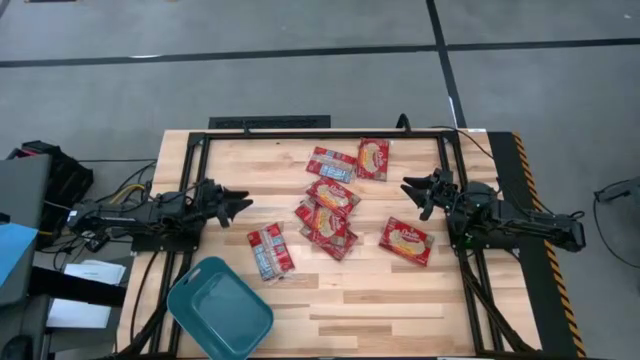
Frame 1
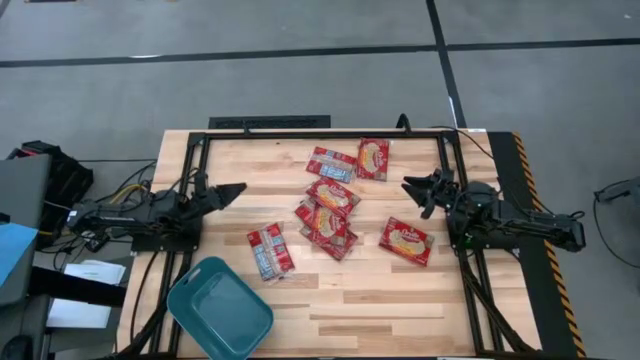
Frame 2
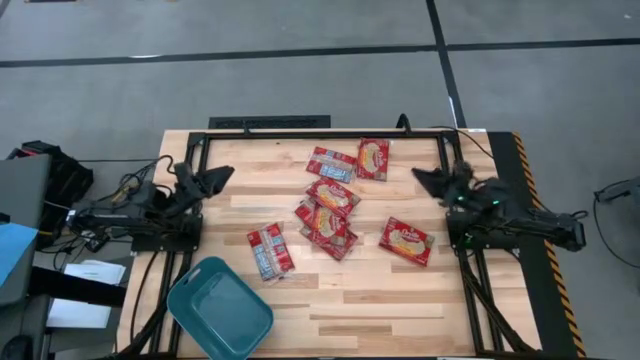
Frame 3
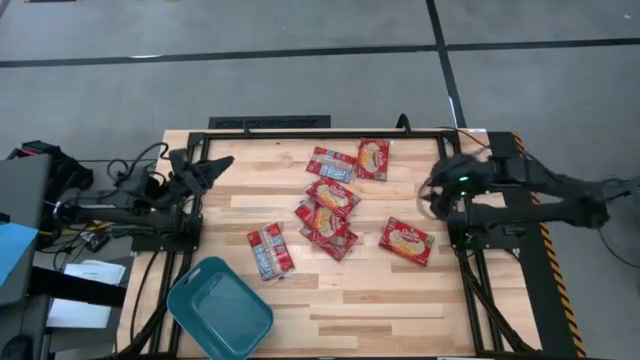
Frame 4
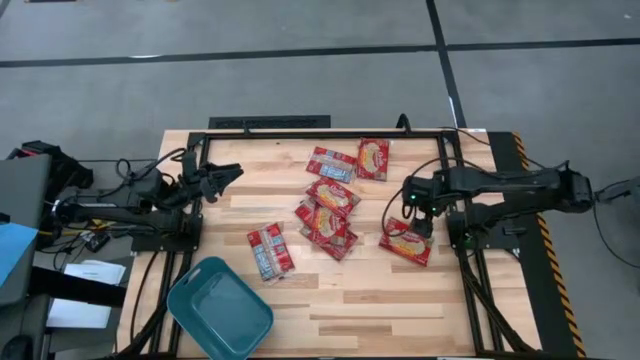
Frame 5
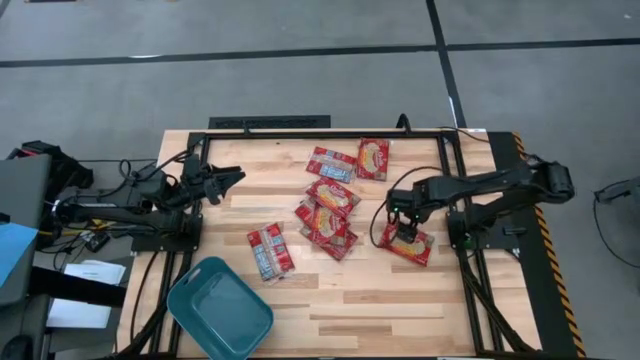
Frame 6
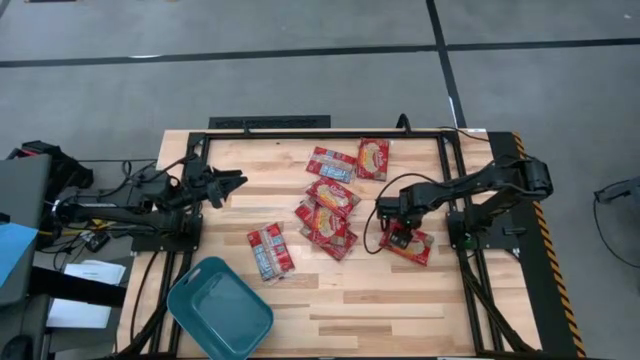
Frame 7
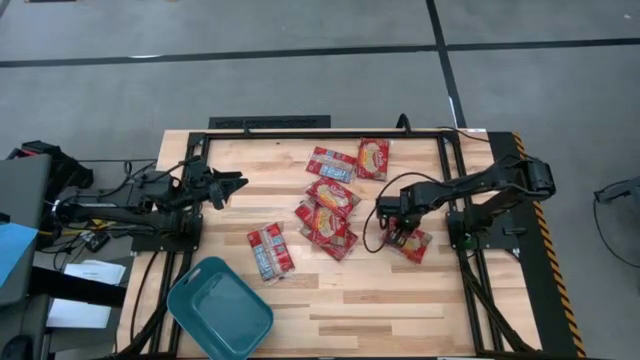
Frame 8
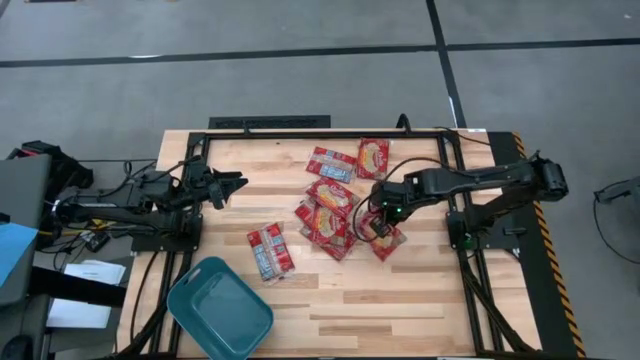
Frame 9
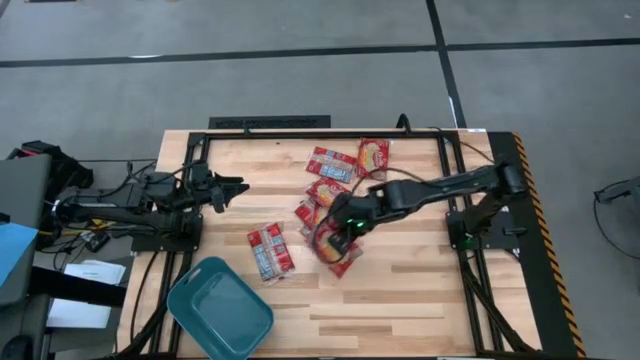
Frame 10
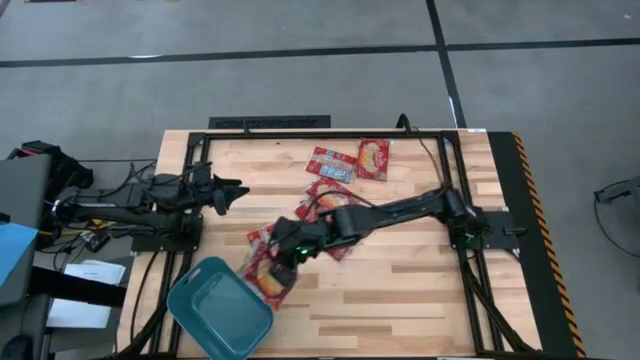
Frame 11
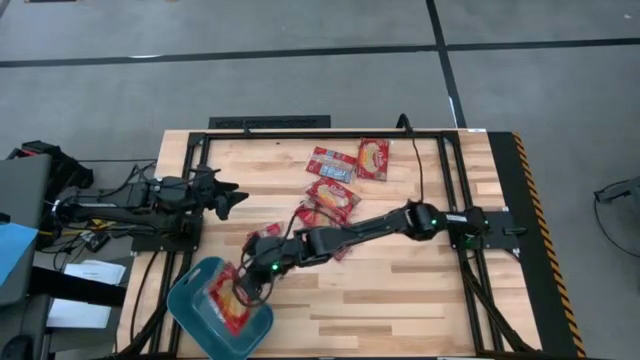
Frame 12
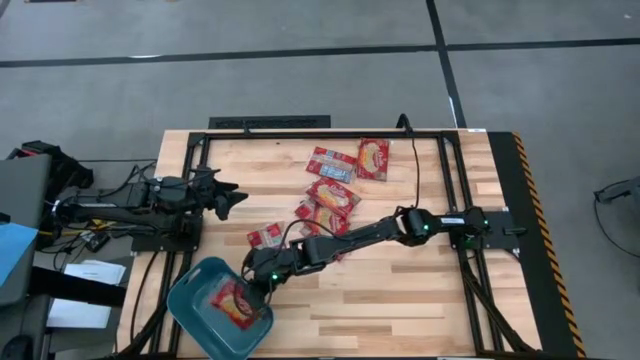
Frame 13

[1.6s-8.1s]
Task: Sort popcorn bags into baskets
Put the red popcorn pack into the blue bin

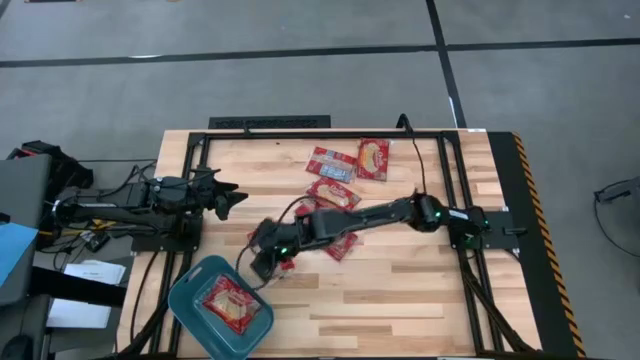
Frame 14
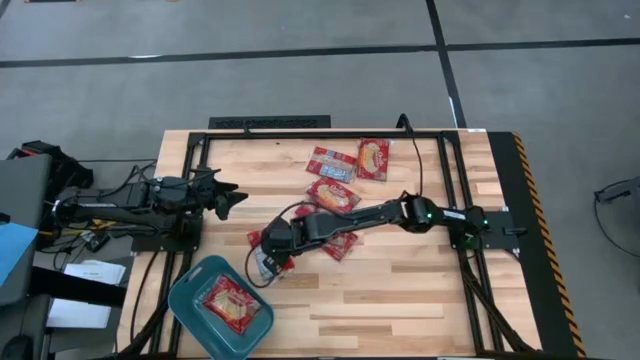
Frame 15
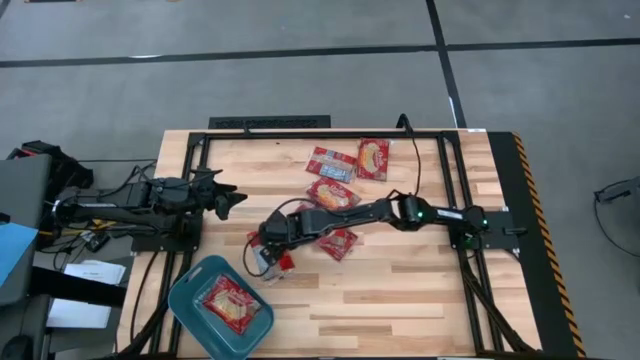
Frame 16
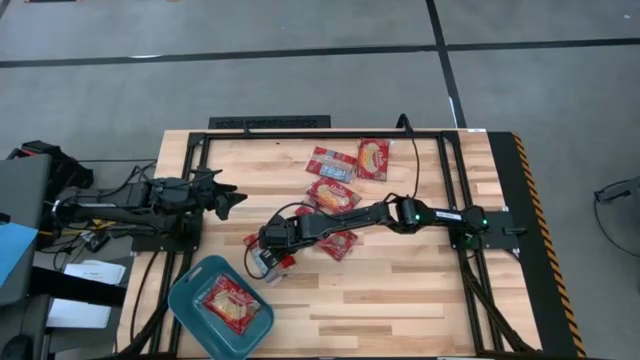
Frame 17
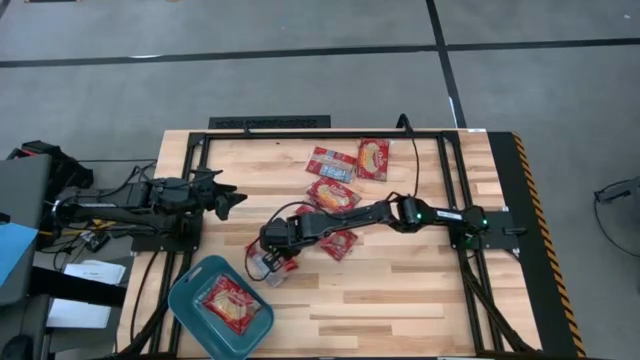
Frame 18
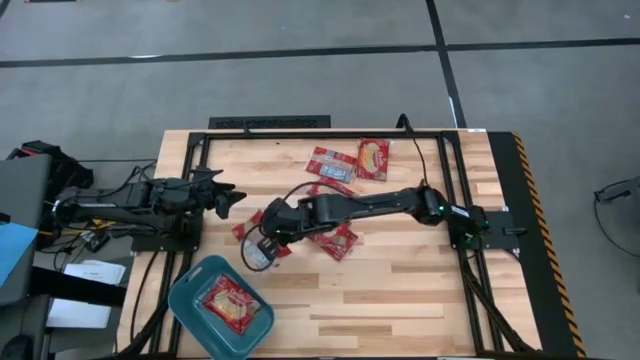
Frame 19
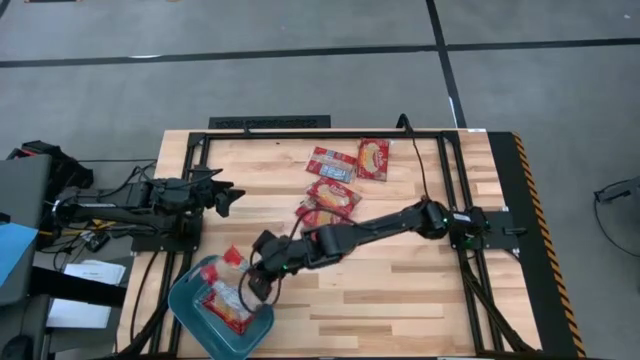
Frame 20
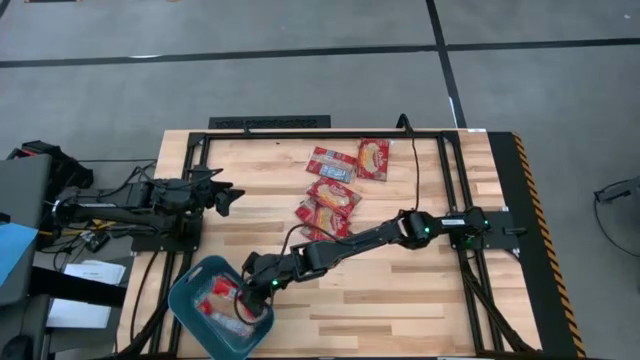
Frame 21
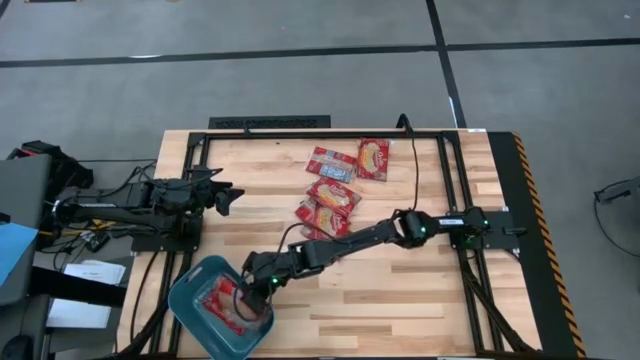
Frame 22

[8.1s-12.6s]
Put the red popcorn pack into the blue bin

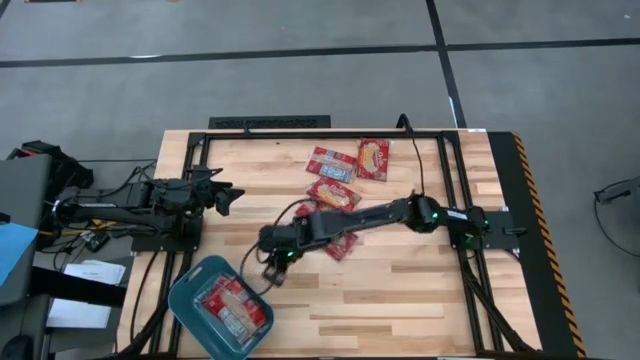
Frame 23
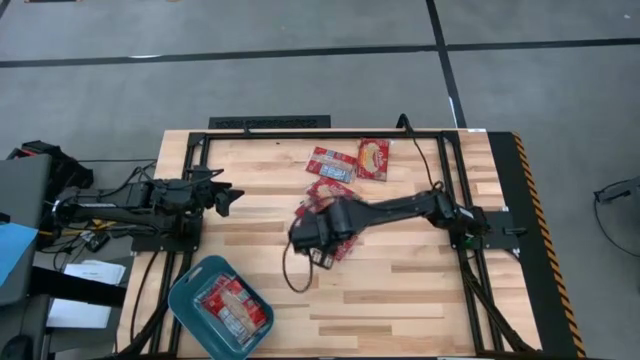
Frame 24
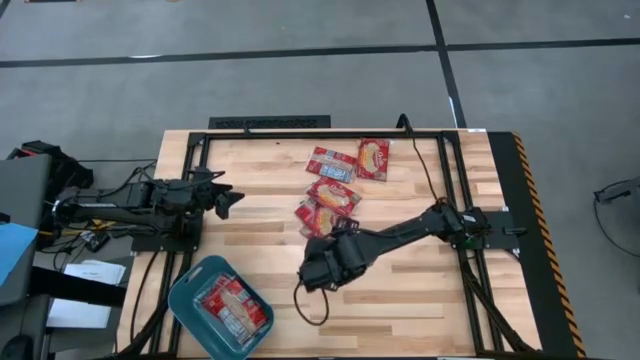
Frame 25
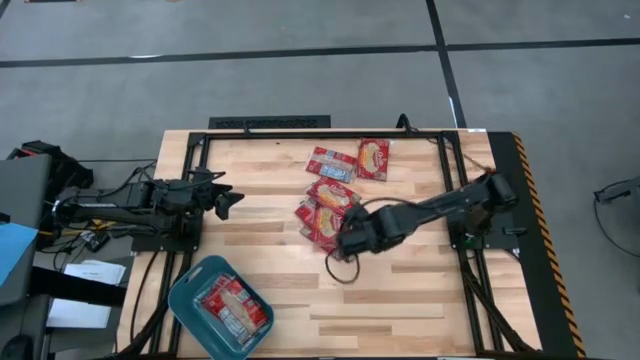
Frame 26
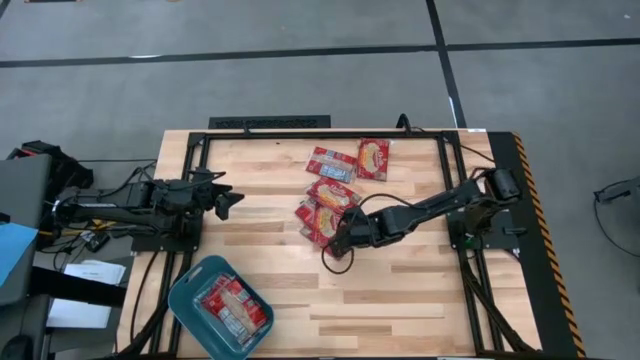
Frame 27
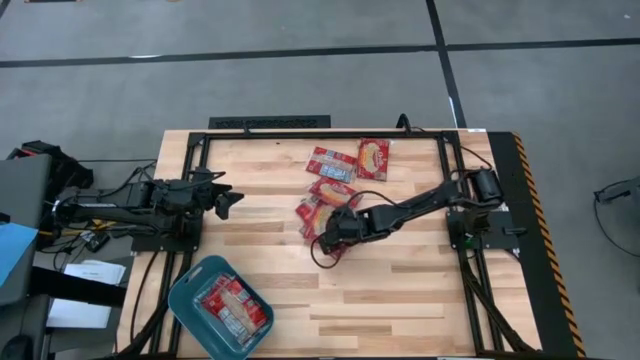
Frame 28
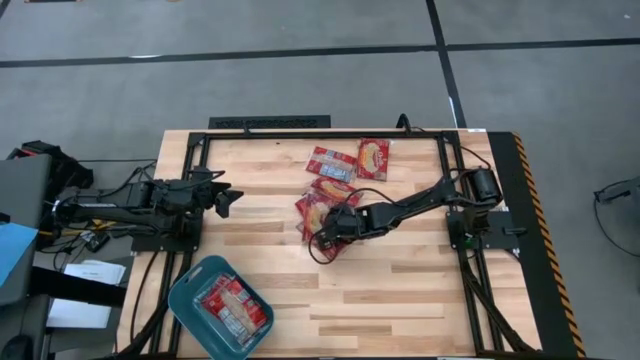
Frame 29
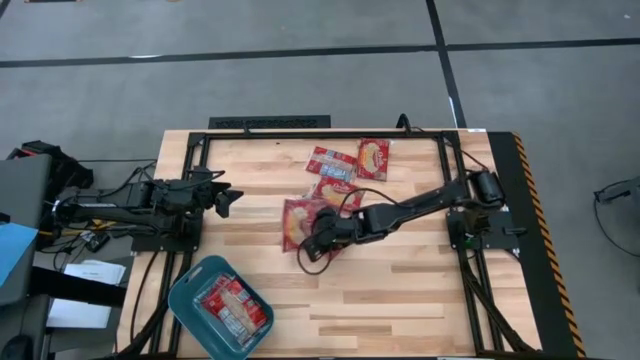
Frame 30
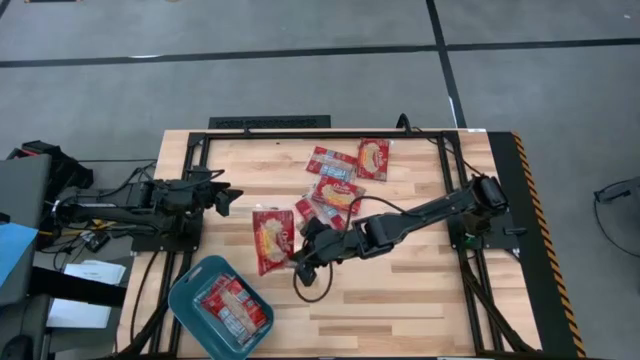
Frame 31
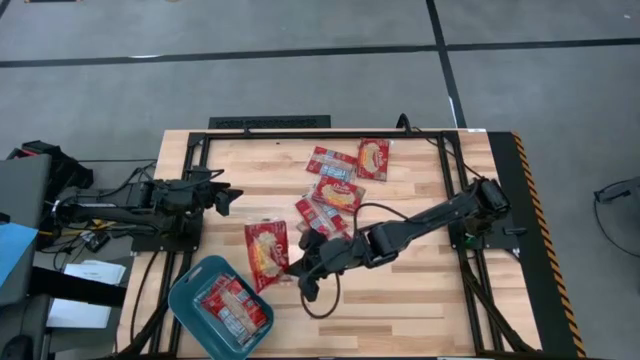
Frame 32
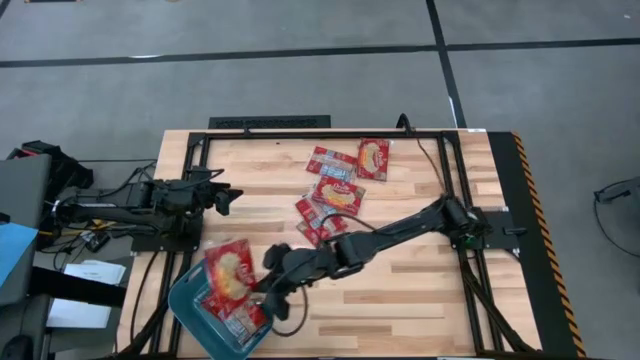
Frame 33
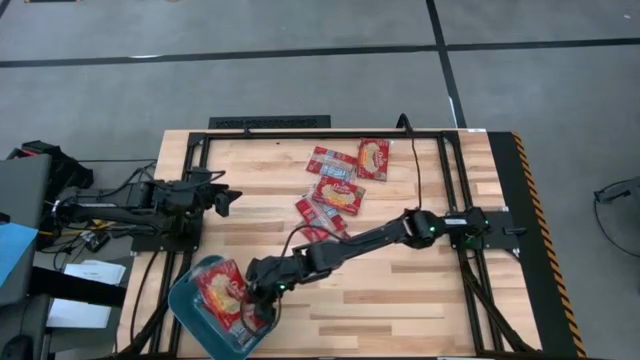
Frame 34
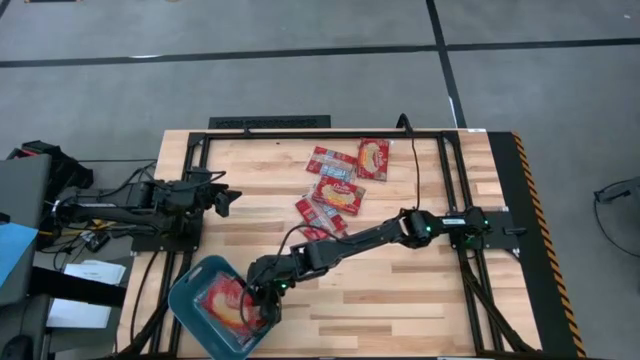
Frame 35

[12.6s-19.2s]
Put the red popcorn pack into the blue bin

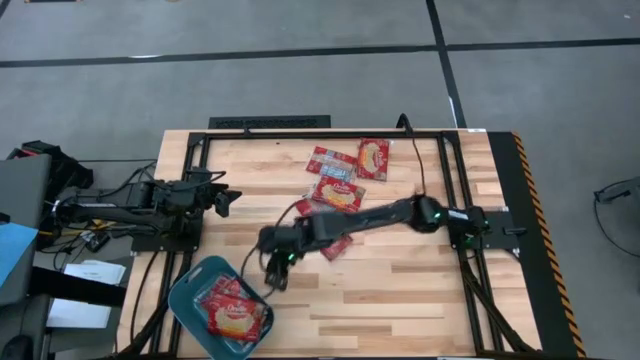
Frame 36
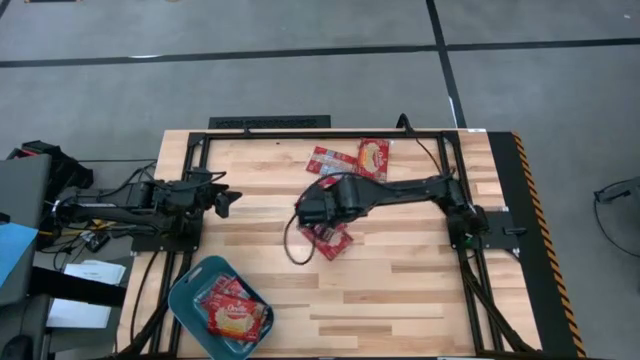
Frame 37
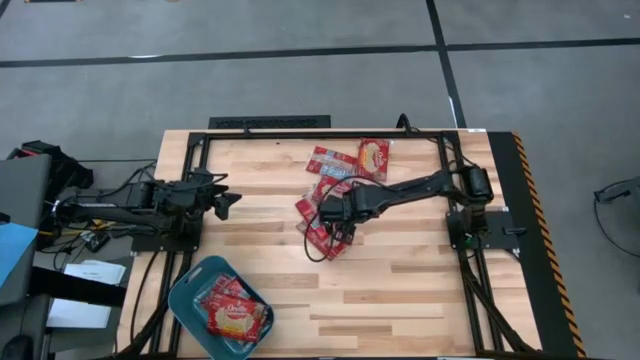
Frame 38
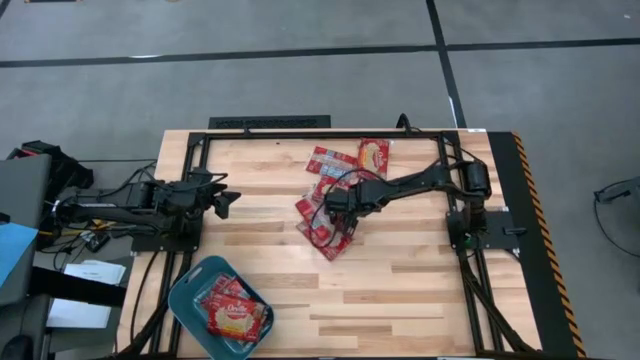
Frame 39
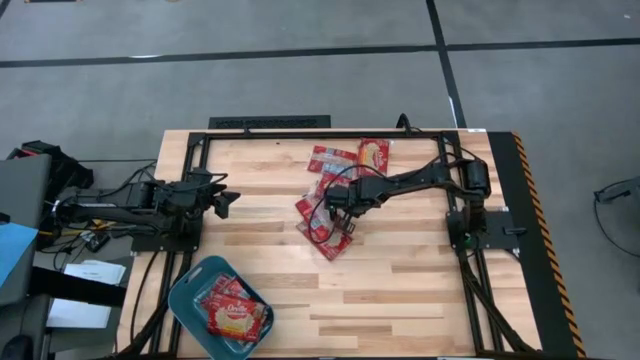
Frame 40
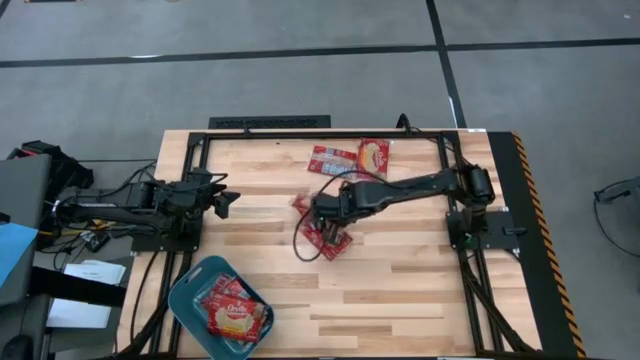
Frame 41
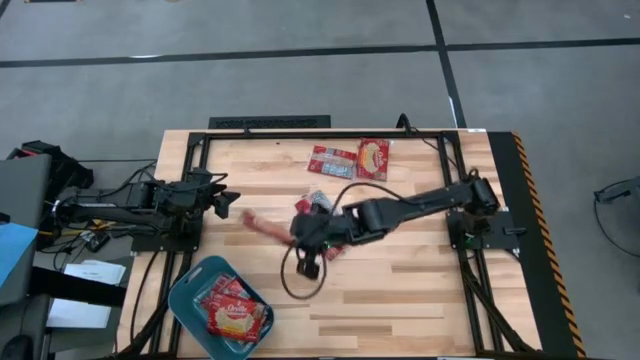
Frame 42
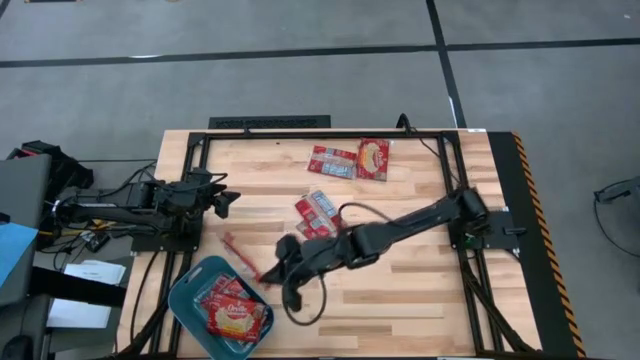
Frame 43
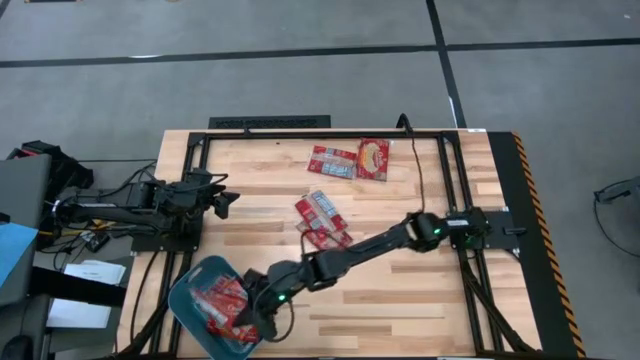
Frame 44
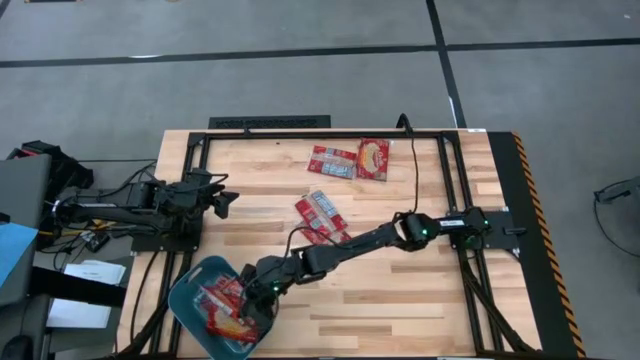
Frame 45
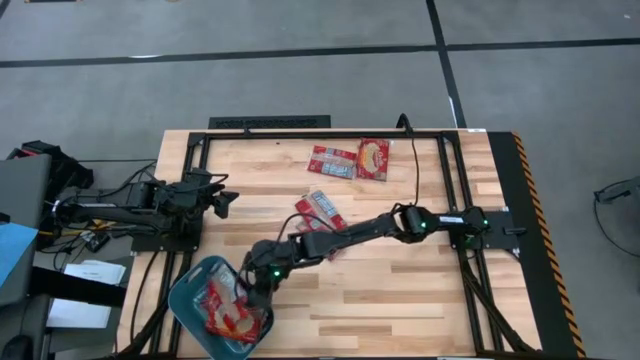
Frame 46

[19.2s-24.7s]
Put the red popcorn pack into the blue bin
